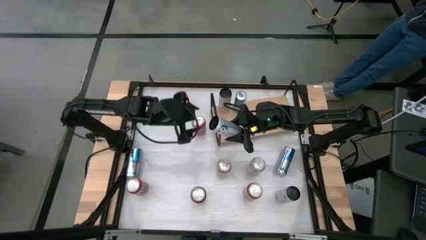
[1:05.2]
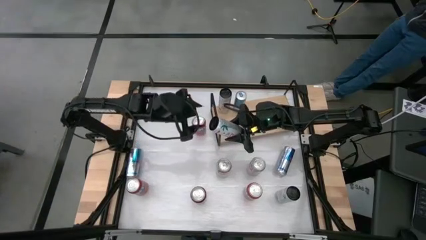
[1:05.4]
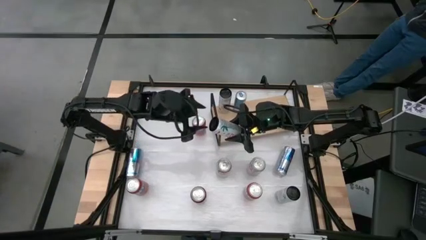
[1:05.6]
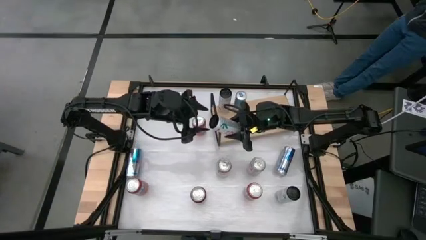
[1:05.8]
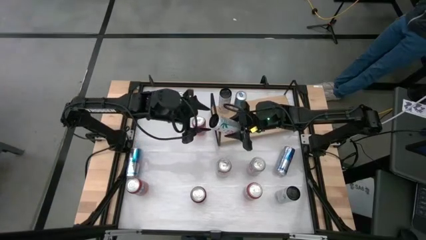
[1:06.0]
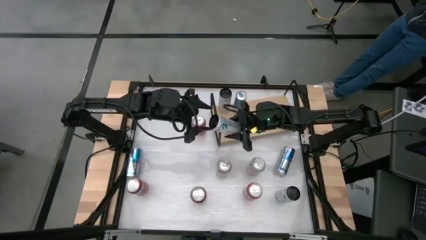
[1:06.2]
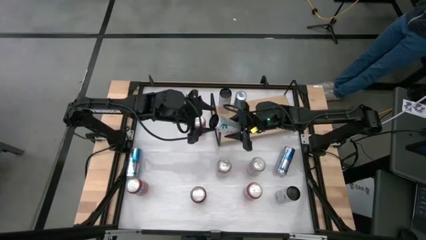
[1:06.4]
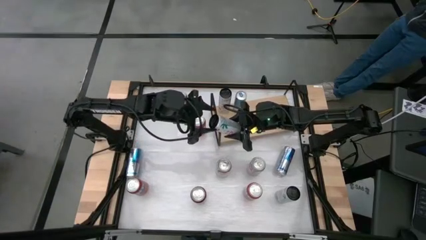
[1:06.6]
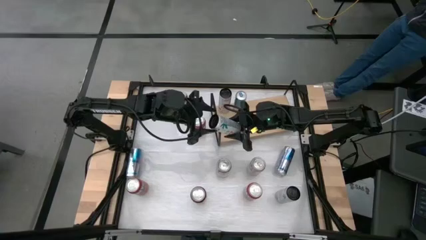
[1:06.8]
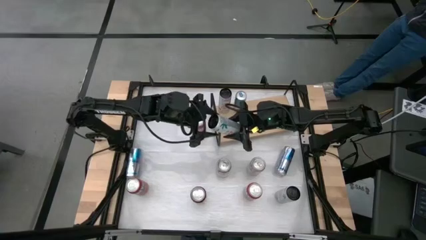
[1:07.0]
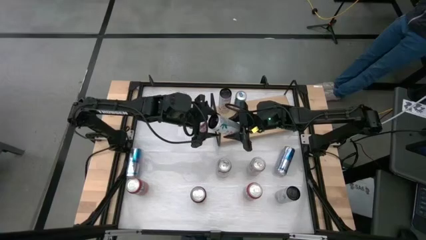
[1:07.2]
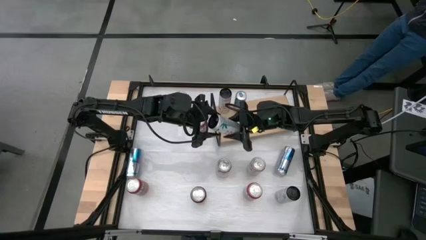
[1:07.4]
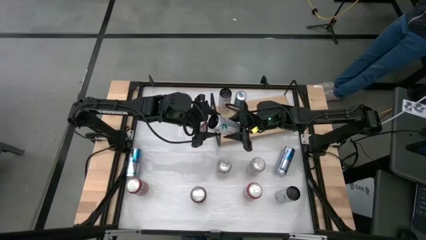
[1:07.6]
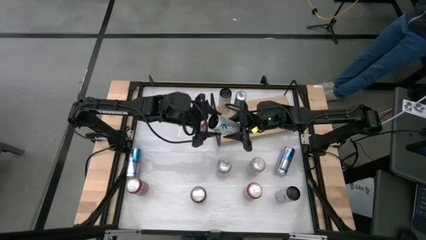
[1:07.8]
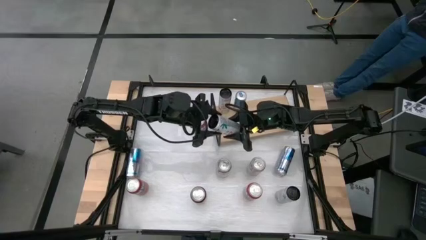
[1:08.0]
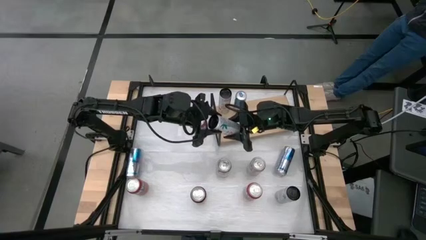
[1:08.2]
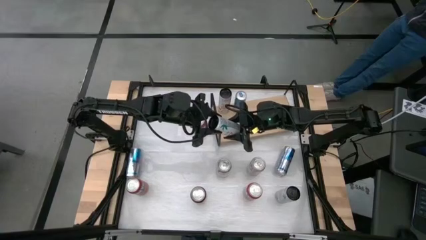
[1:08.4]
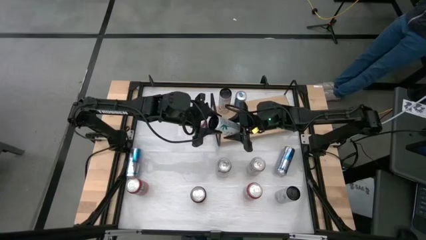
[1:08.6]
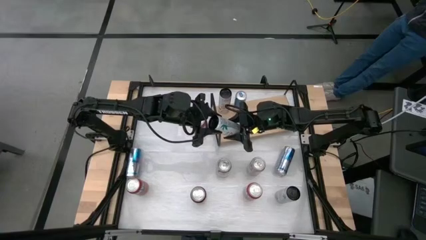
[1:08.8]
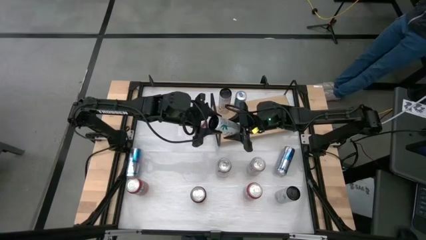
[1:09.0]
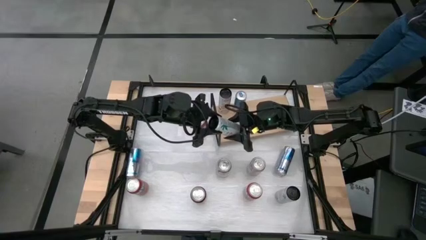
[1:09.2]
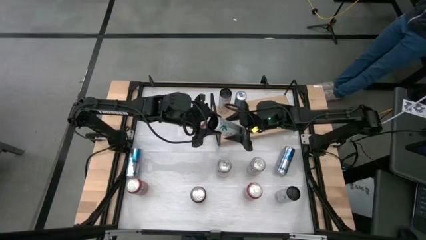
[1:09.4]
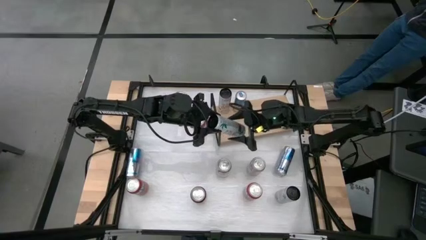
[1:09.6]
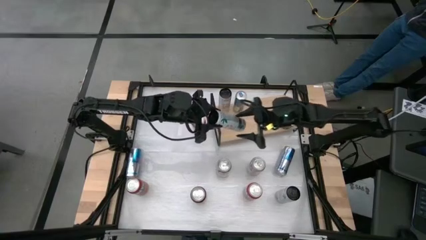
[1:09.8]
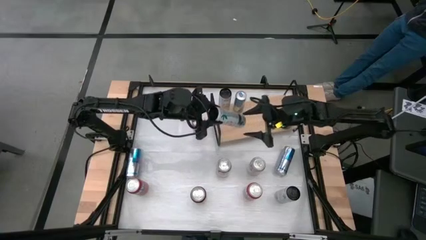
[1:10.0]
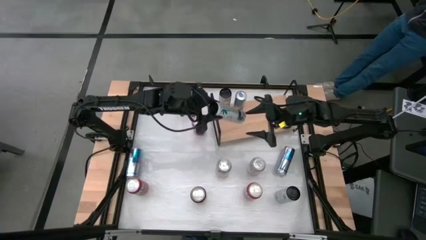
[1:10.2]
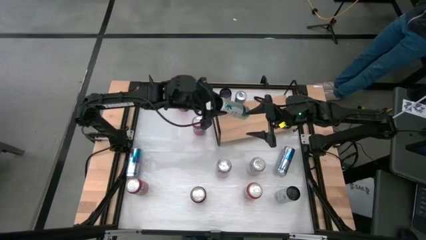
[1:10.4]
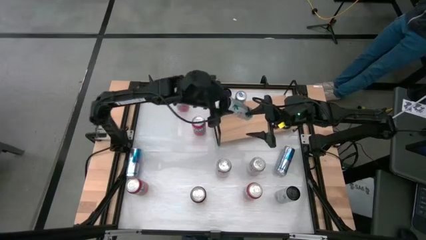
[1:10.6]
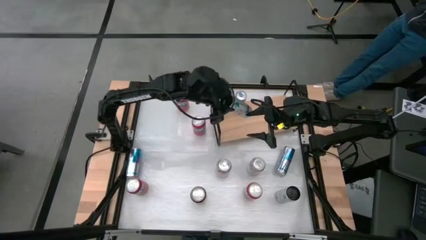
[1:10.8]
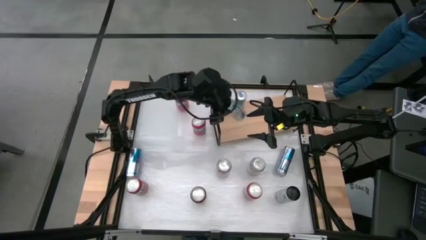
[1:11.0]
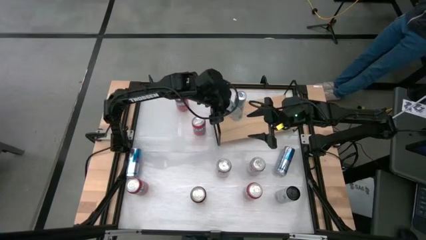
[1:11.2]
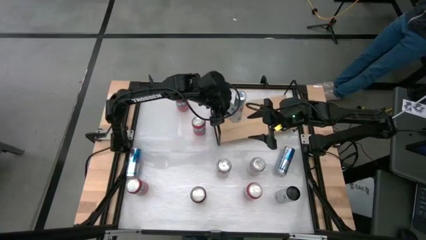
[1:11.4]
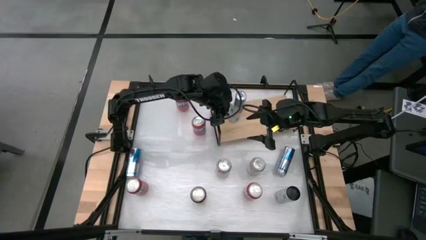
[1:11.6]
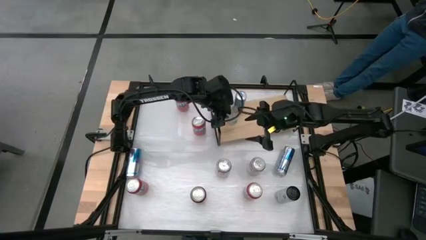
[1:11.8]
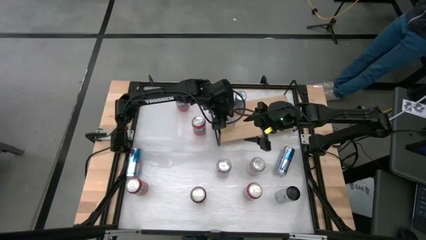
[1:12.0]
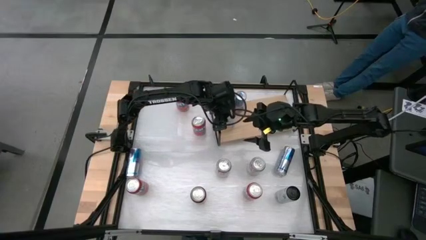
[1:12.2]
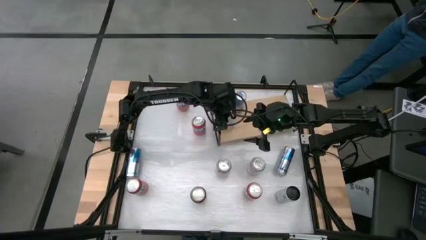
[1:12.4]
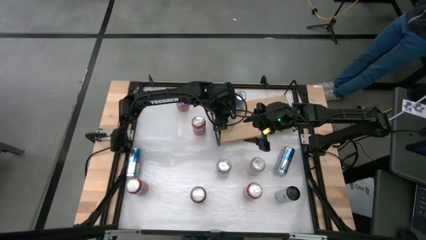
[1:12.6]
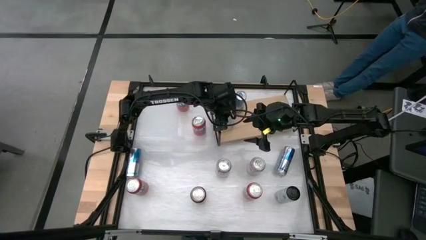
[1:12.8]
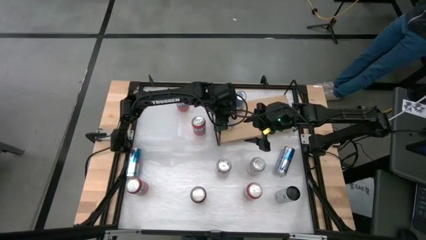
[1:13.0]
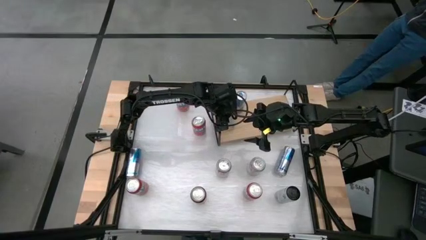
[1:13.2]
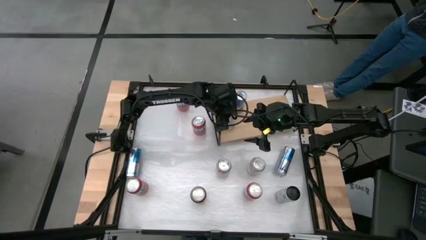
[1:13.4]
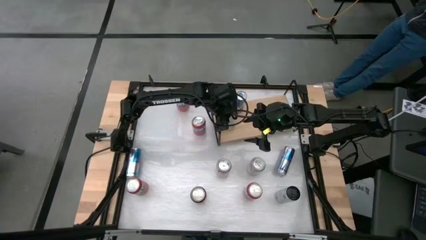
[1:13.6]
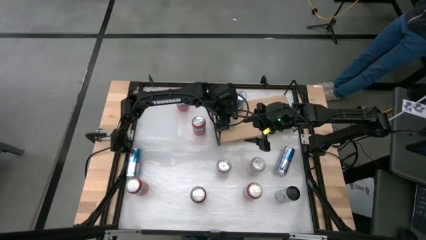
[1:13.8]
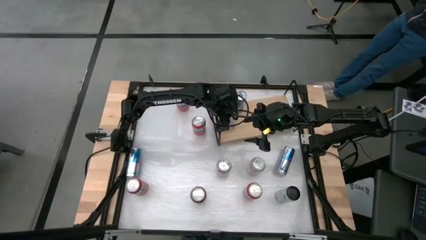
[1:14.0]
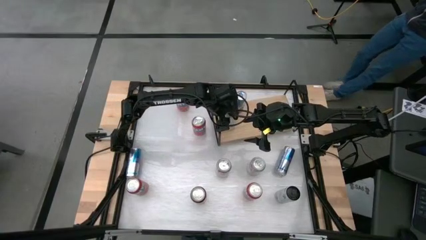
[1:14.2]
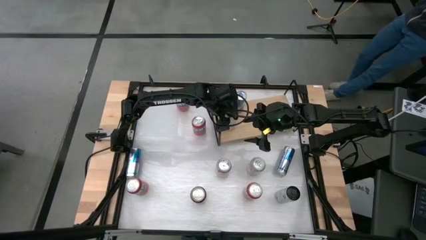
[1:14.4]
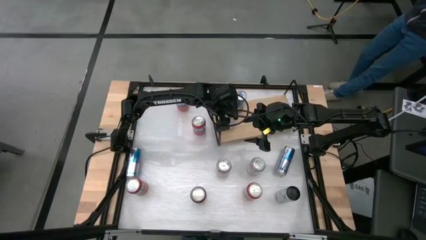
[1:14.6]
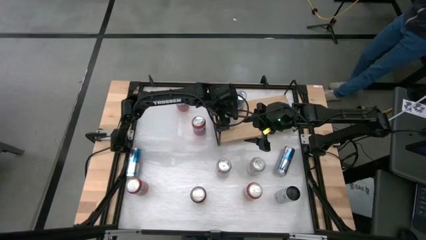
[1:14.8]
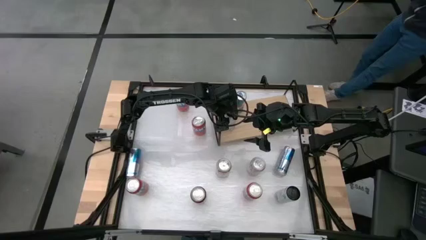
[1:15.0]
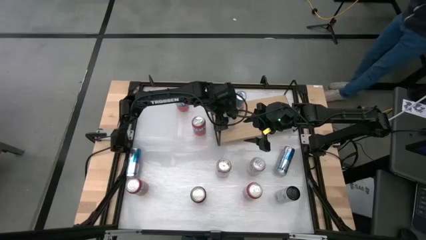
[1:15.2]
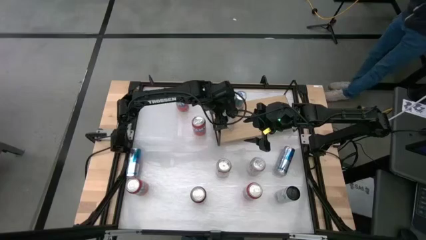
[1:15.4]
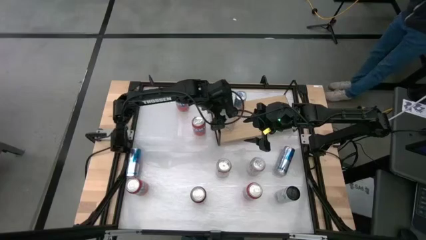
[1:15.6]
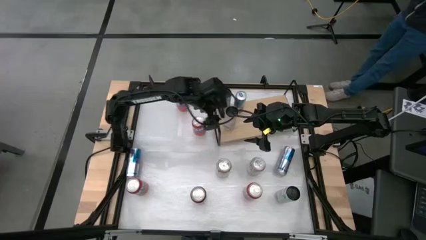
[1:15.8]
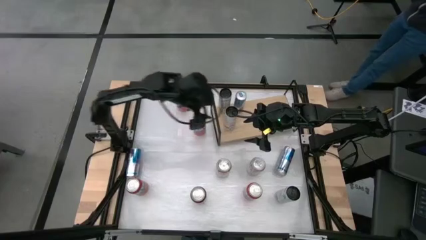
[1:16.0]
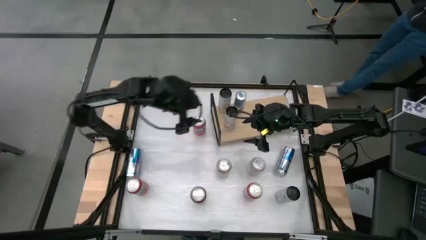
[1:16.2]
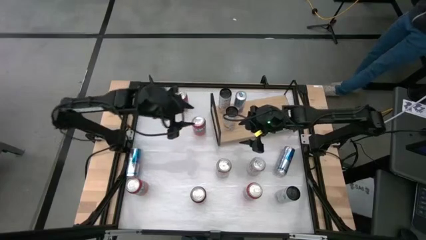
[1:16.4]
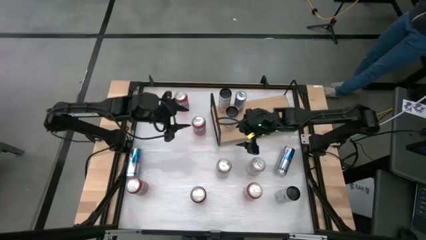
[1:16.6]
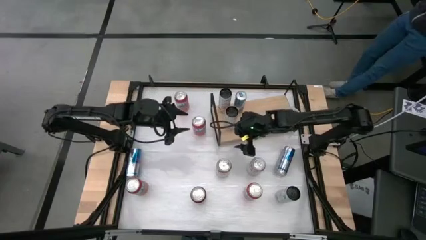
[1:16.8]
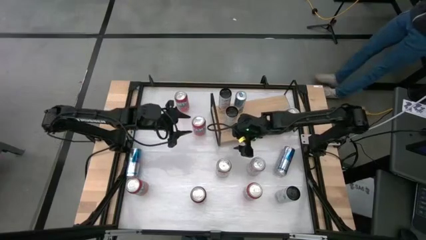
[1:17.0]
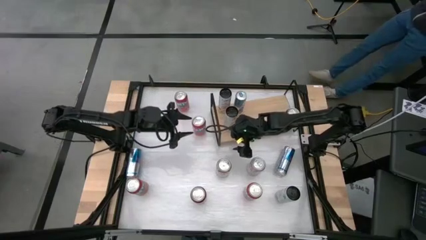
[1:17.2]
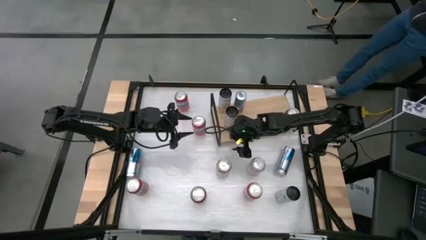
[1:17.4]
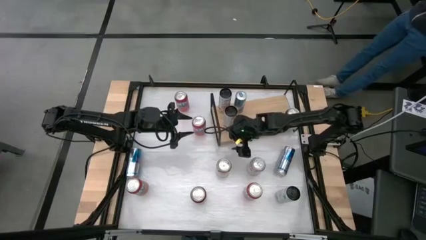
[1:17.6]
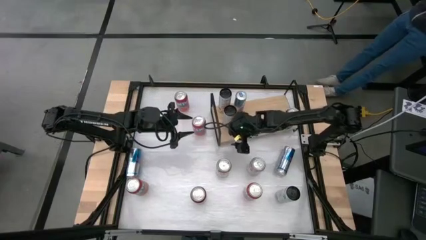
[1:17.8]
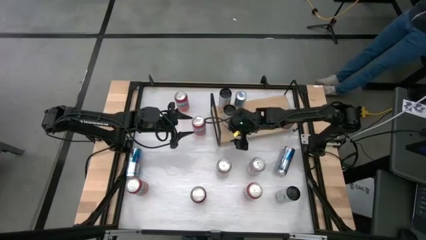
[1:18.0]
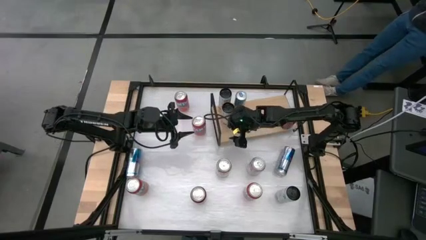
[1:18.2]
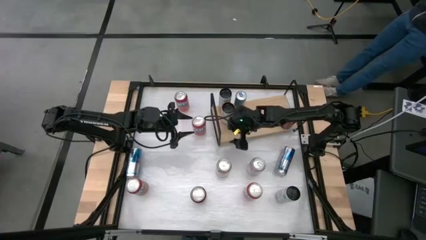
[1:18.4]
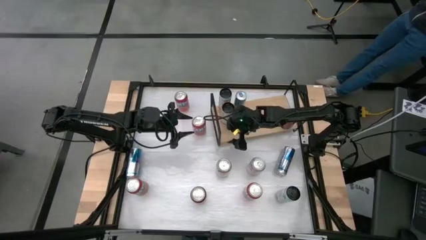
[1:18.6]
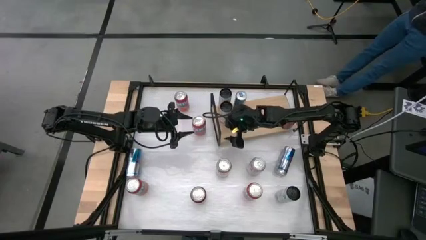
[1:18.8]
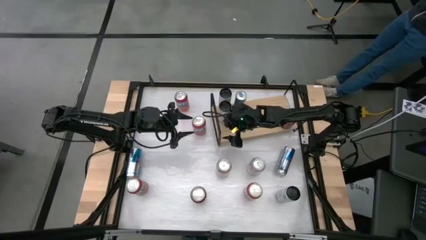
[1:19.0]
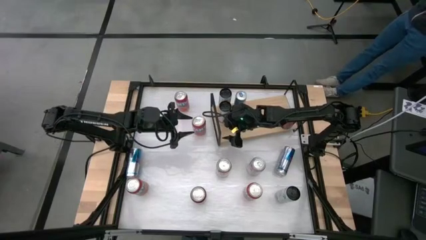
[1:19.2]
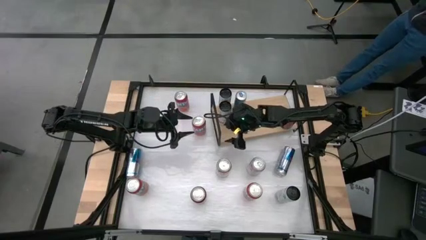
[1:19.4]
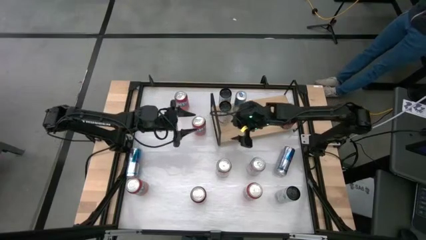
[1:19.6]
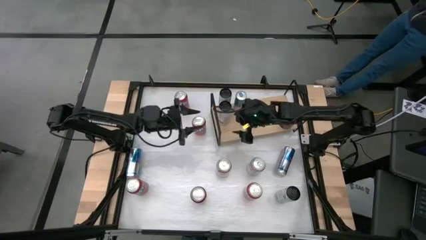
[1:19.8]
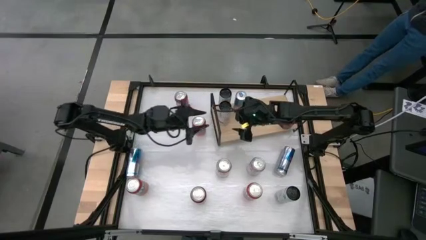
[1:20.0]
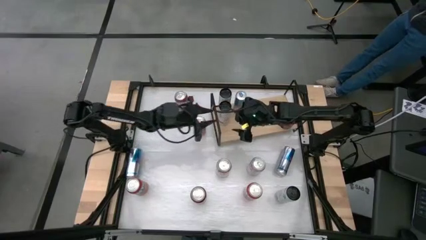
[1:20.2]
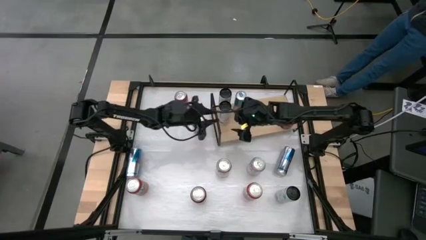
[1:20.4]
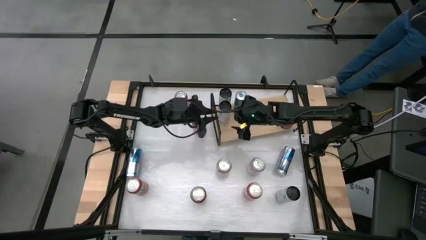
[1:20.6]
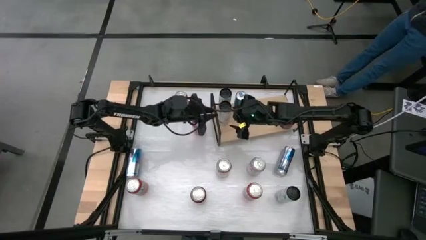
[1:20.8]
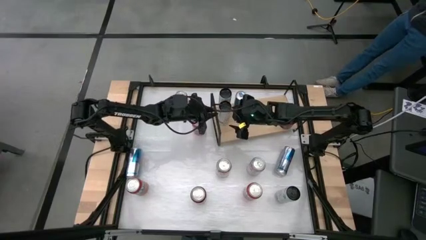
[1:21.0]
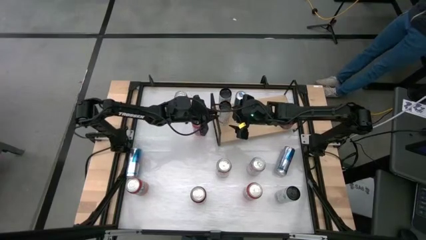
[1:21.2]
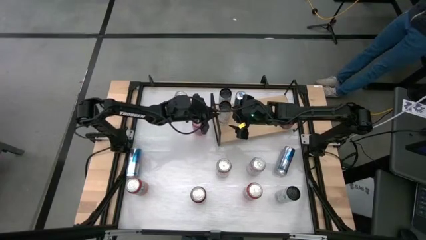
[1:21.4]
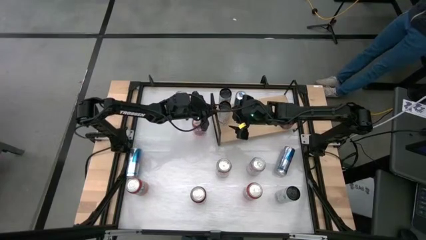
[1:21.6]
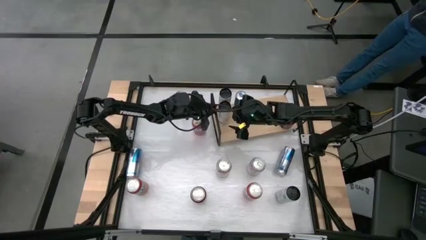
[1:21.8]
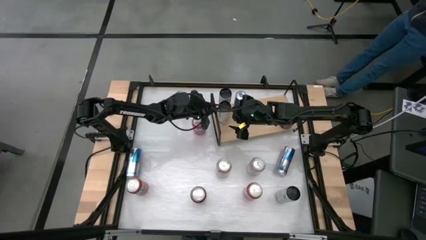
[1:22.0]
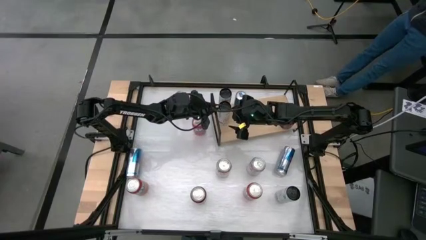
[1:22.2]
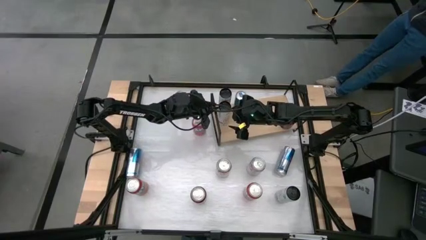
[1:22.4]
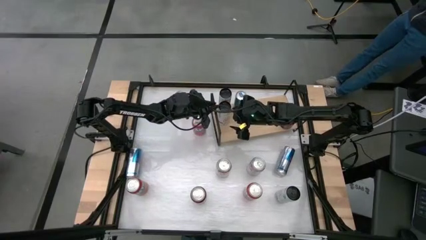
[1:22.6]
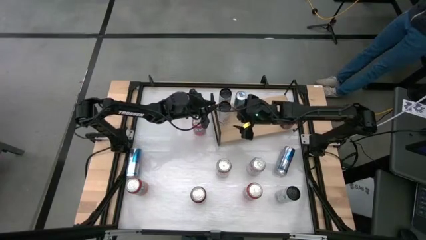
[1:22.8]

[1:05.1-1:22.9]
Task: Place canned beverage on shelf
Put the top white black soda can on the shelf aligned with the other white black soda can
